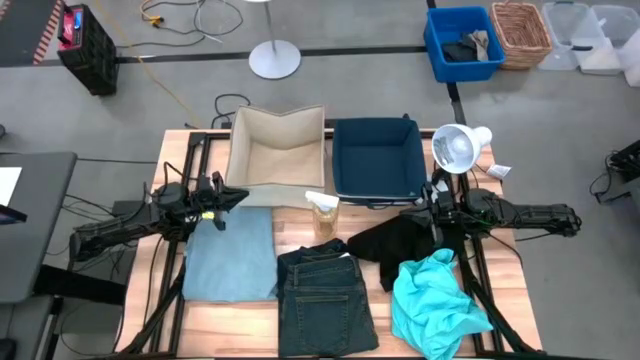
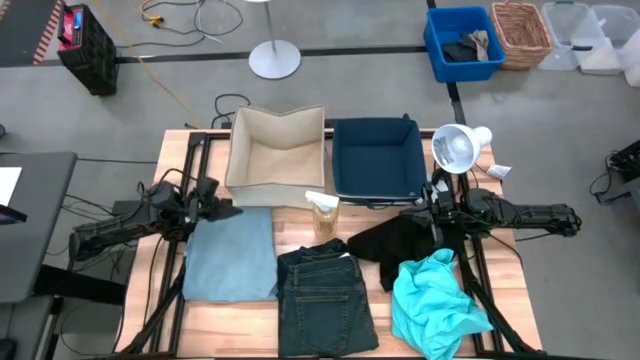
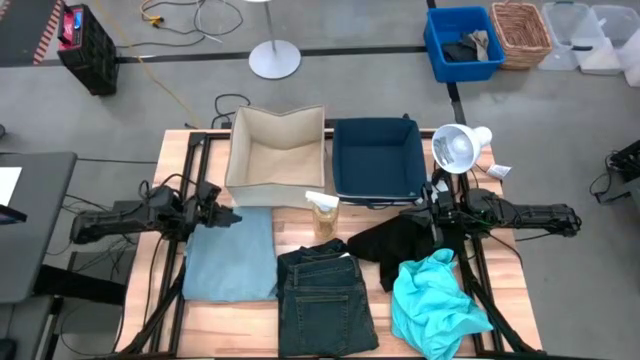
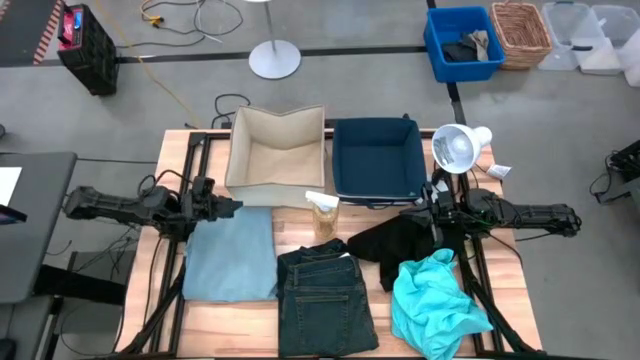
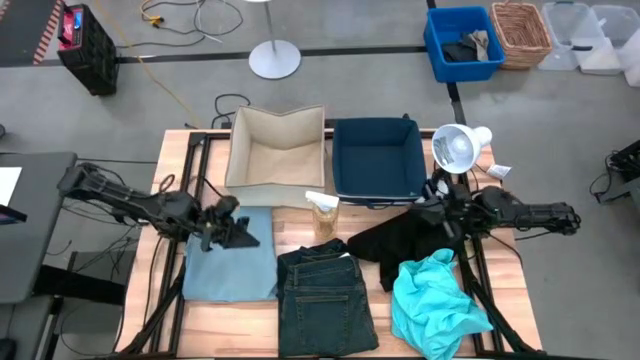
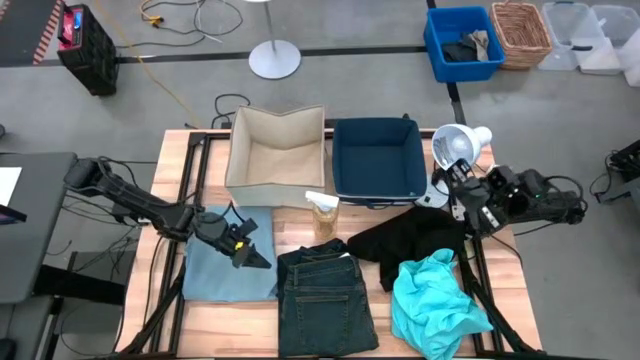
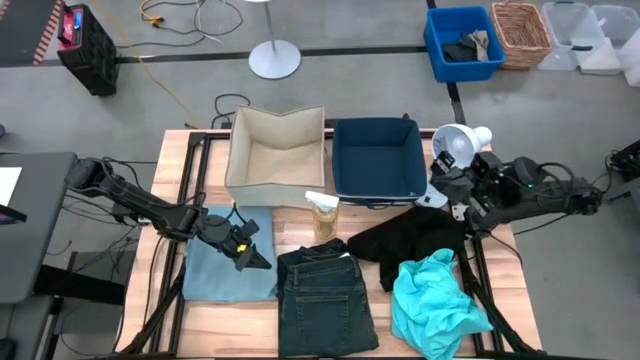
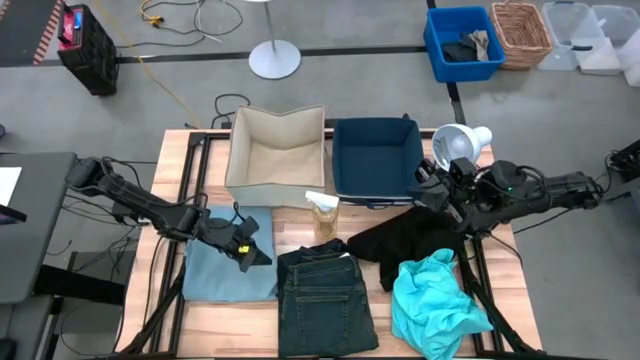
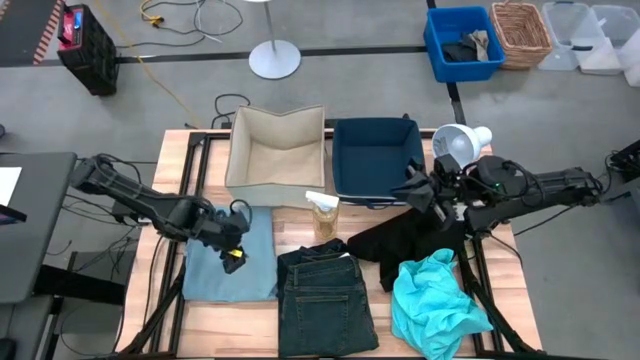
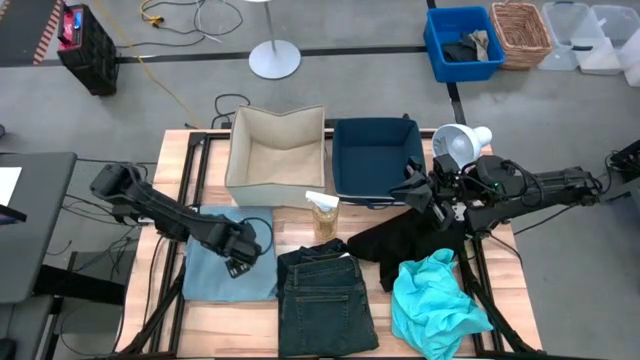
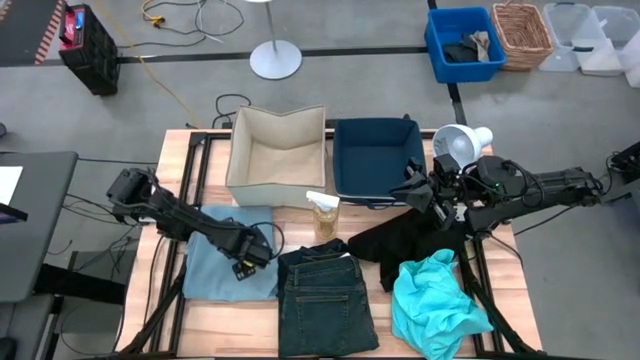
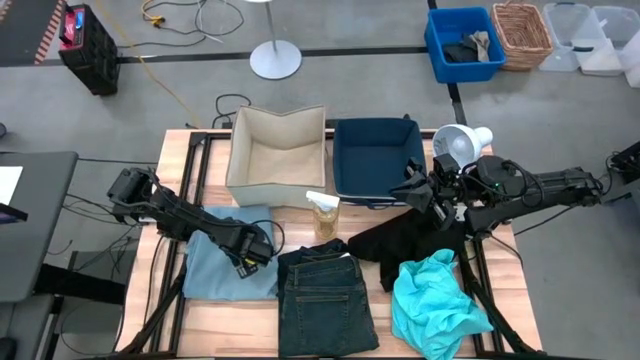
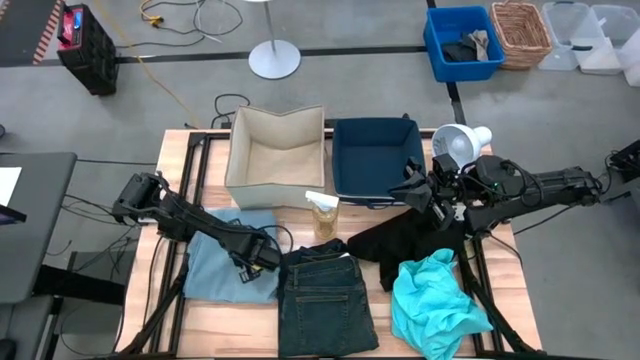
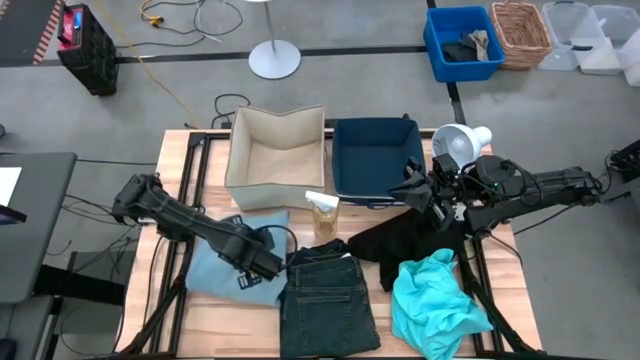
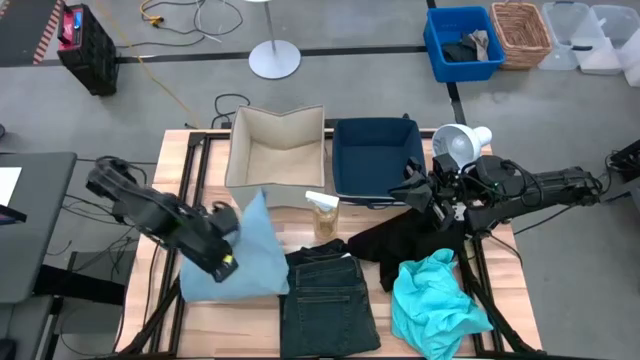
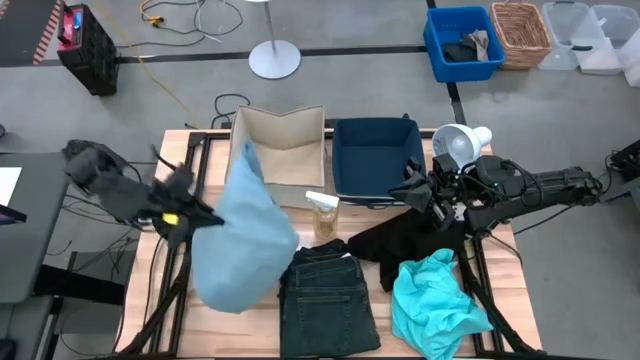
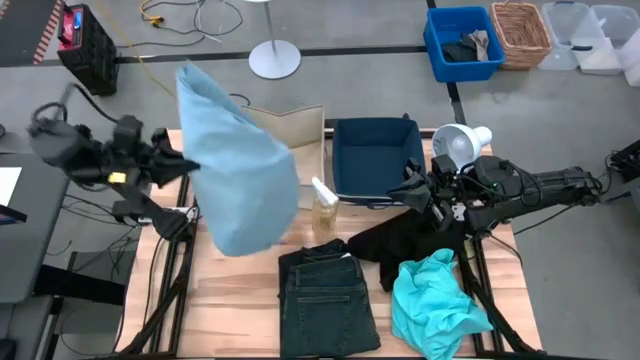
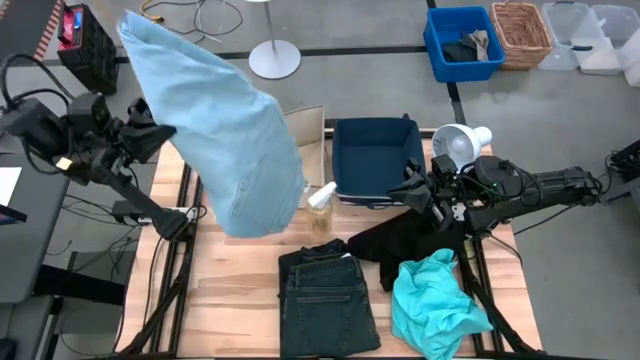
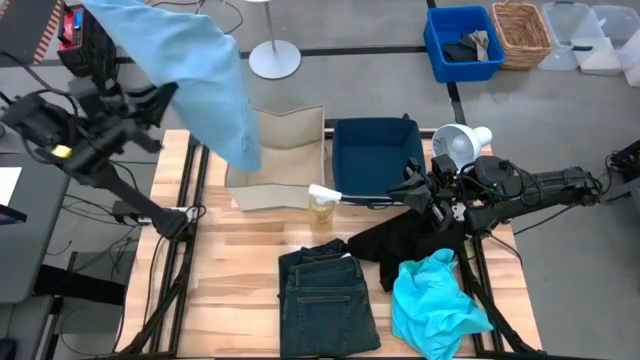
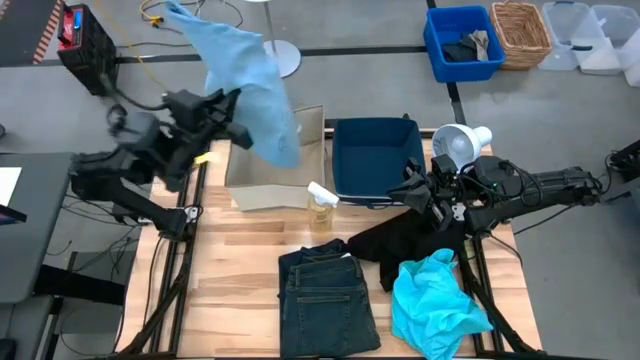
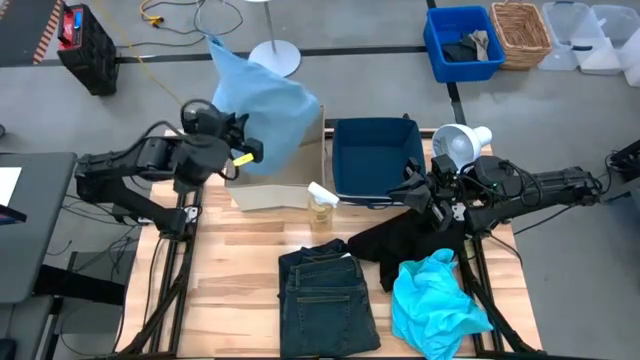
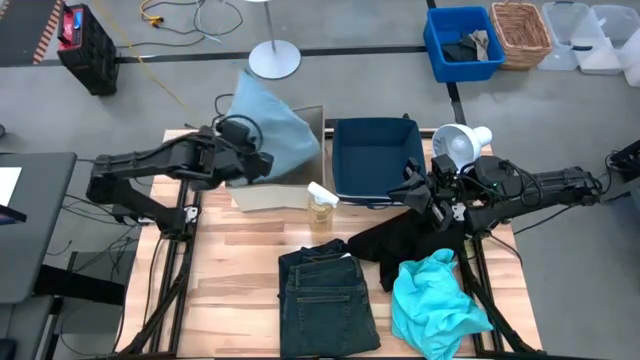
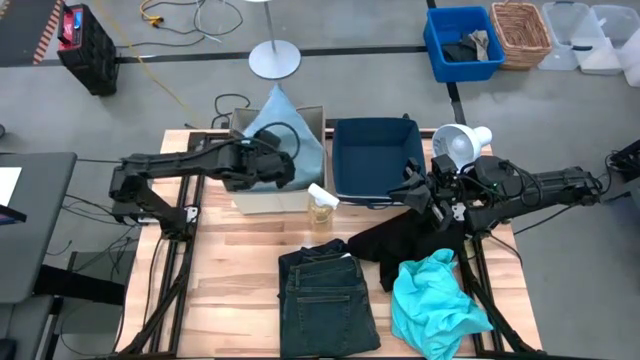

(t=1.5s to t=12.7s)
Task: Sort clothes
Put the light blue pants into the white laundry organizer

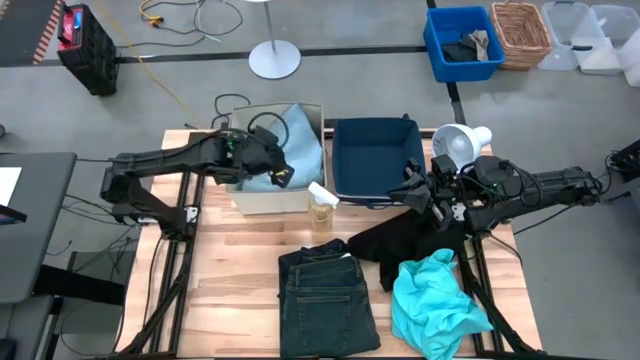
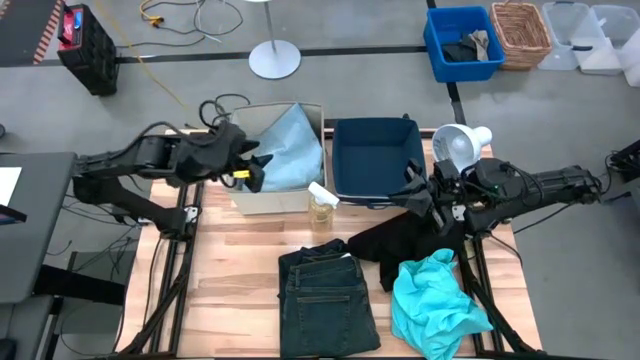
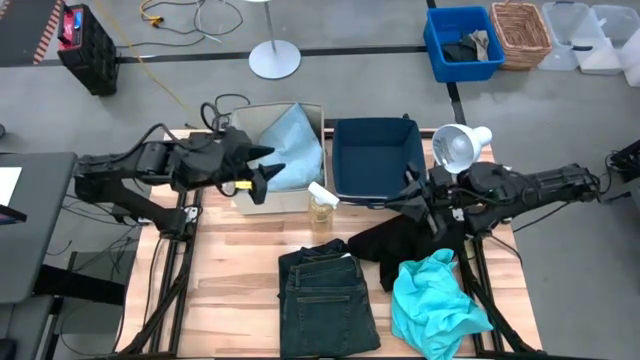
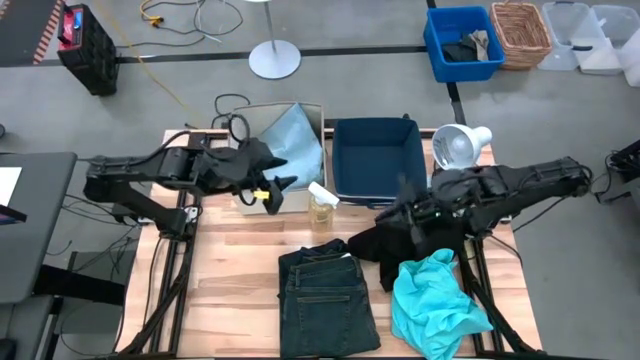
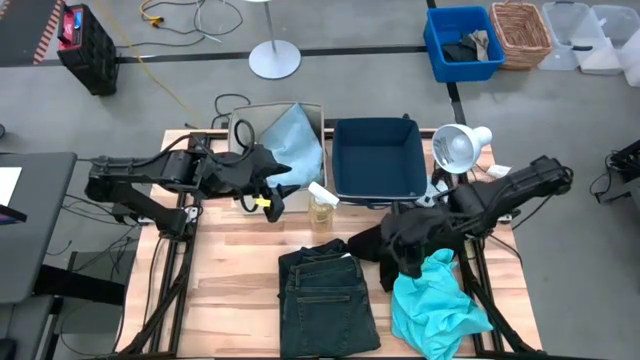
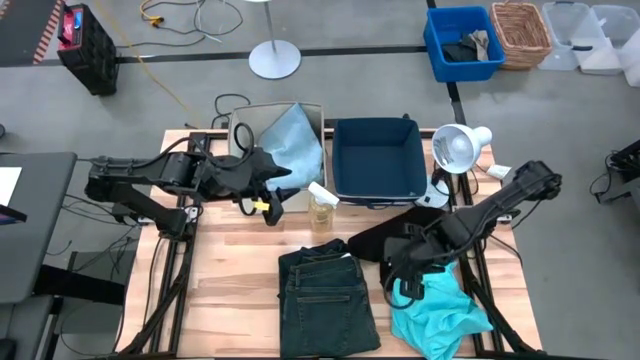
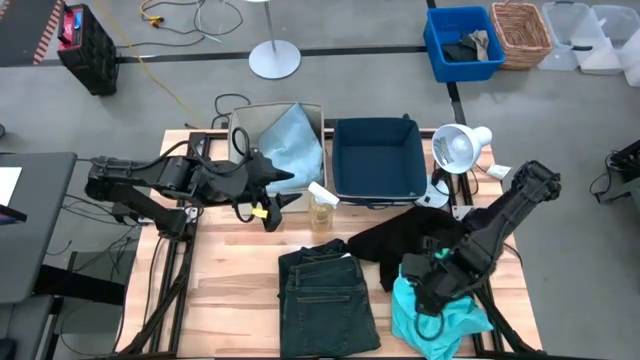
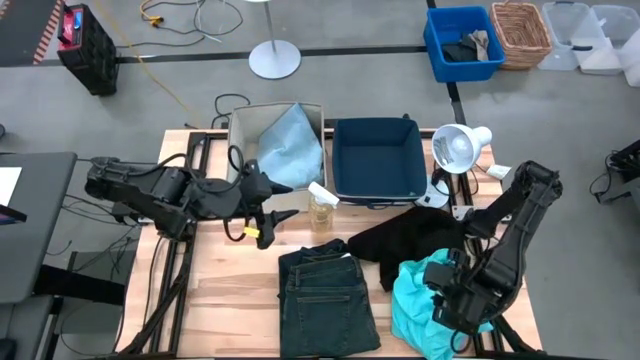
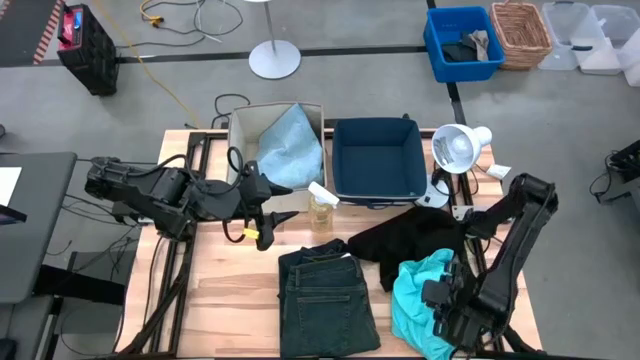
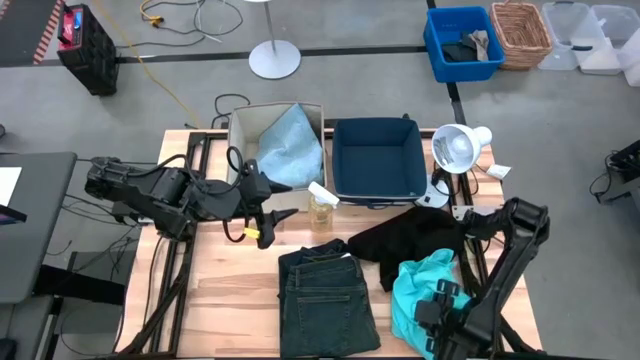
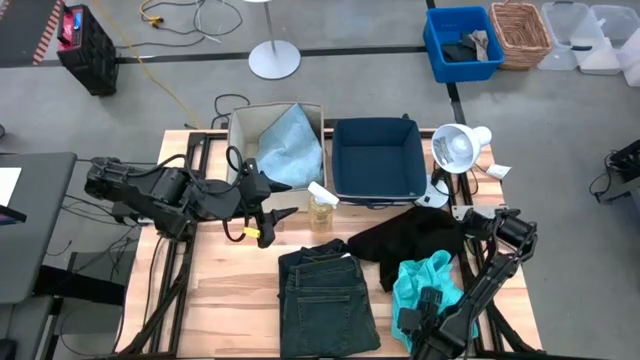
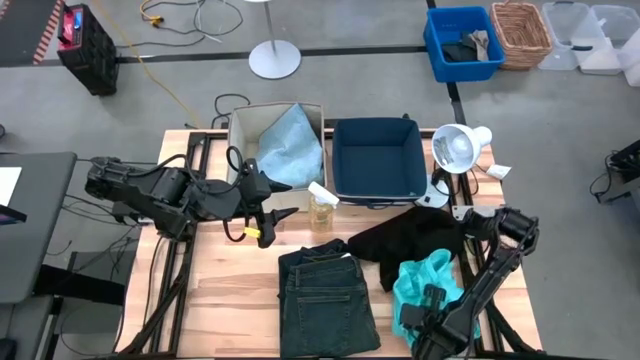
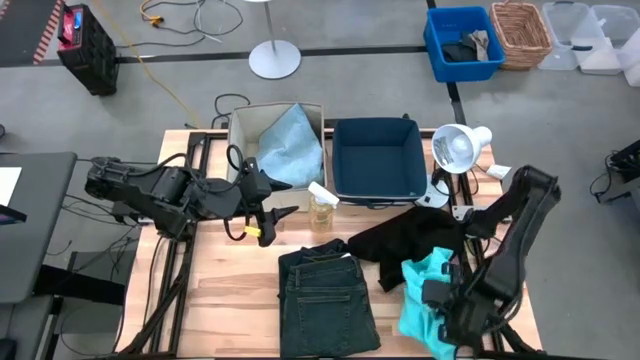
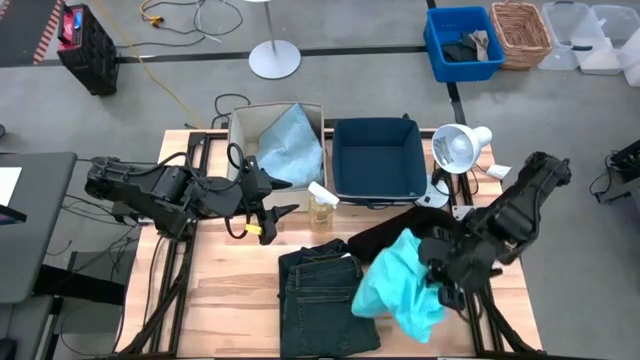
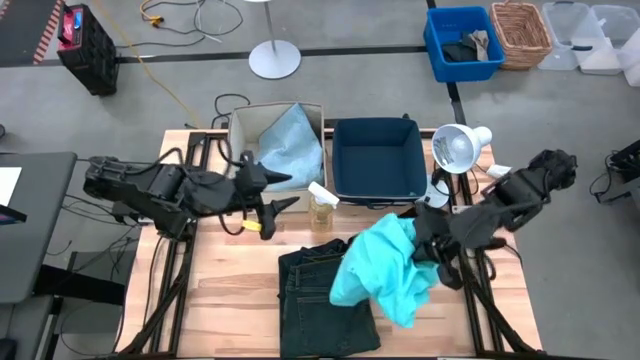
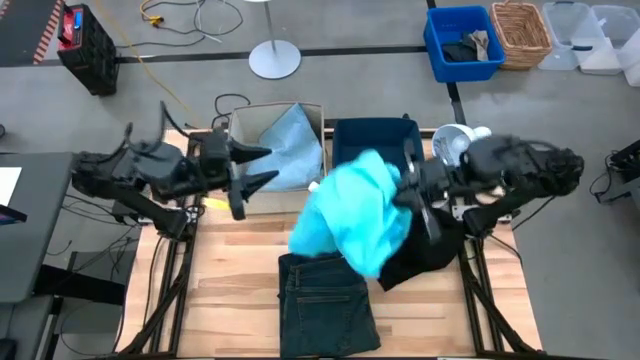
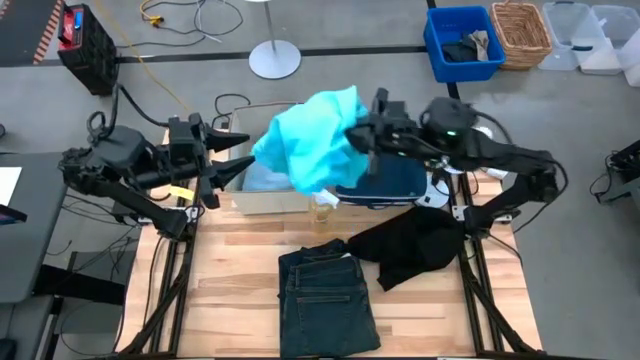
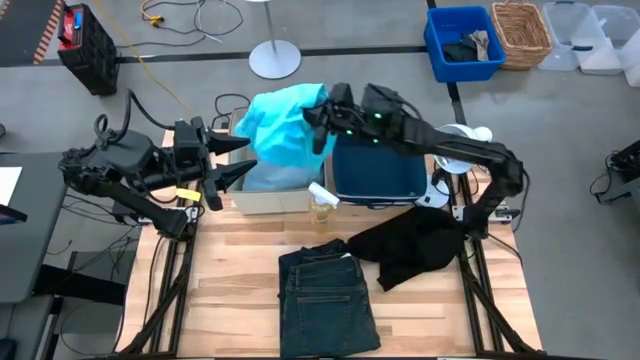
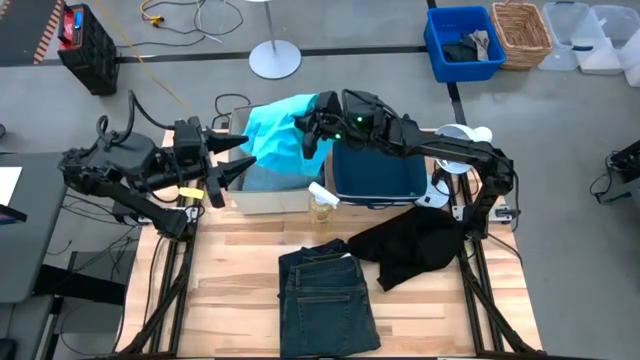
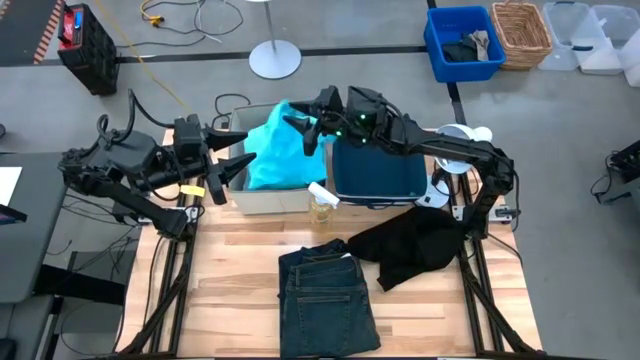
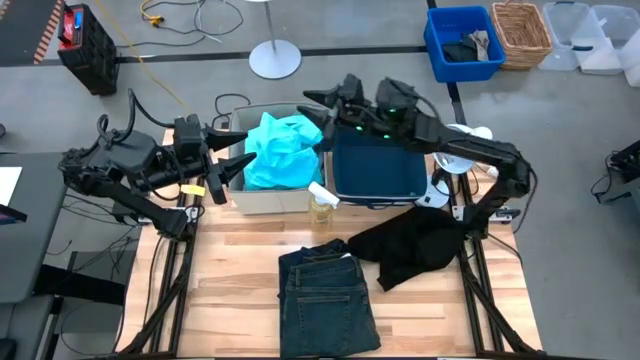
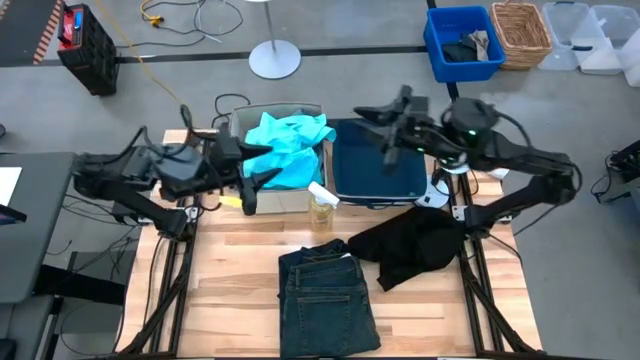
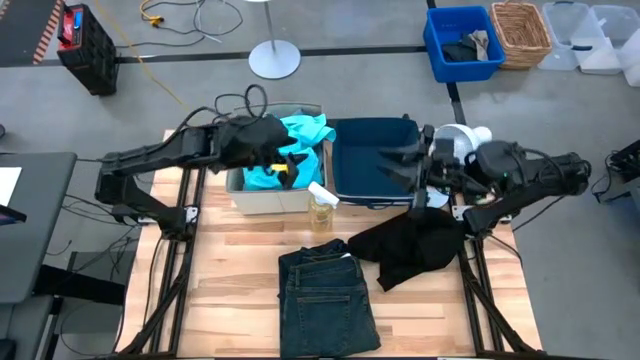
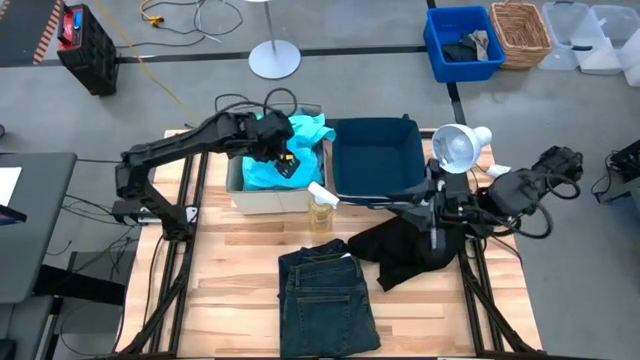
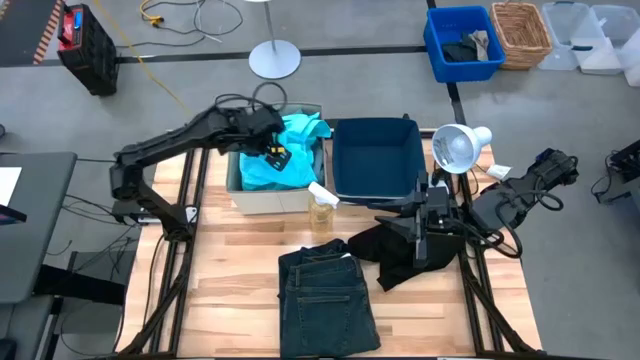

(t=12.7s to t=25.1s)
Put the blue shorts into the white laundry organizer
